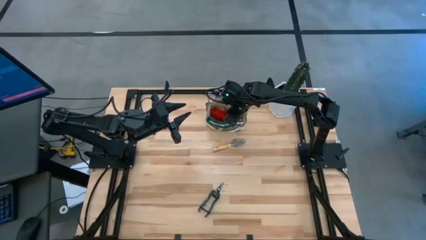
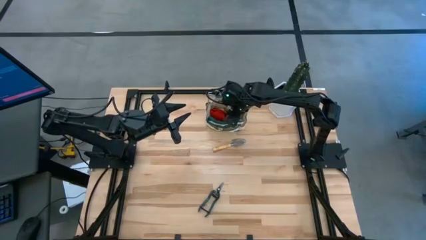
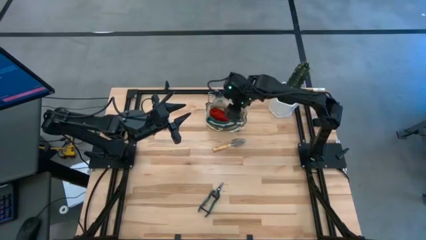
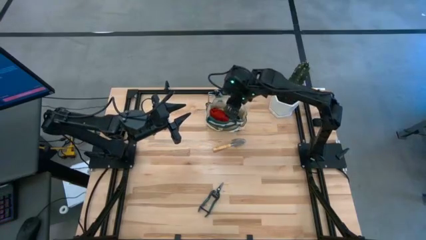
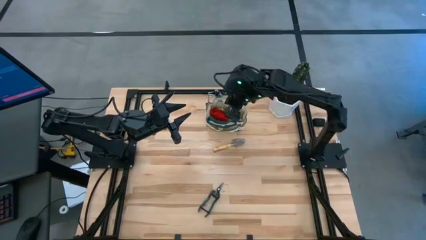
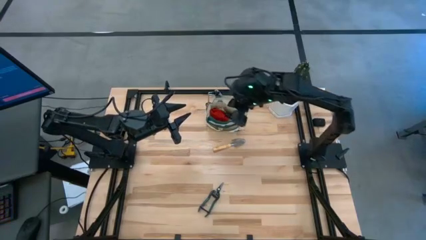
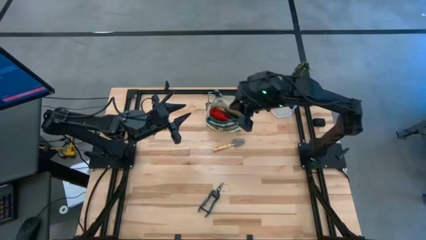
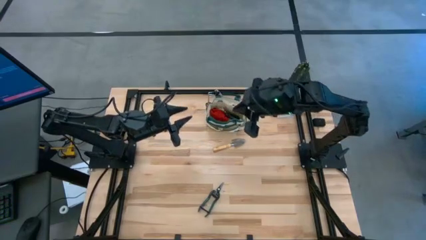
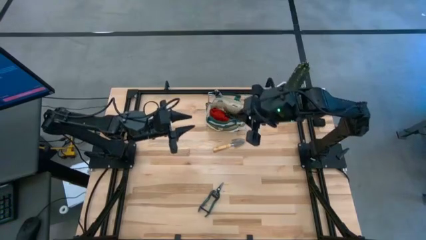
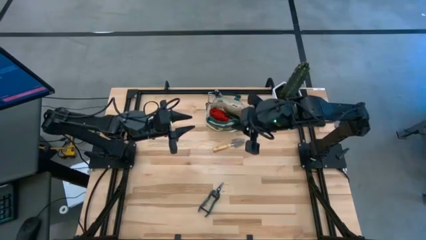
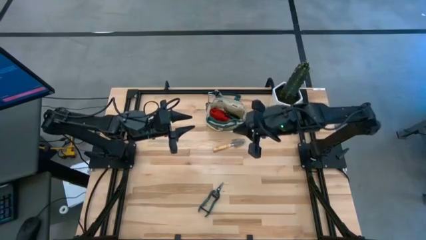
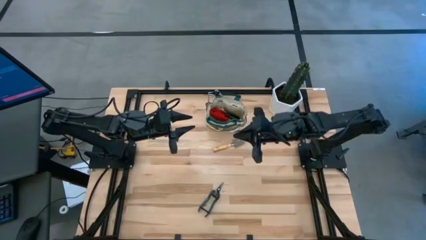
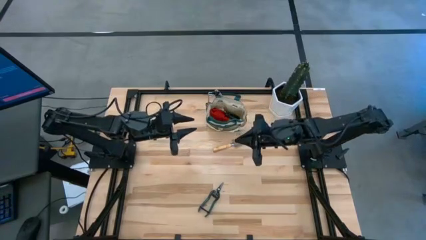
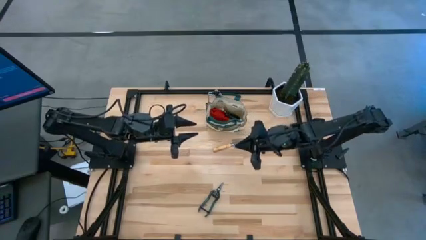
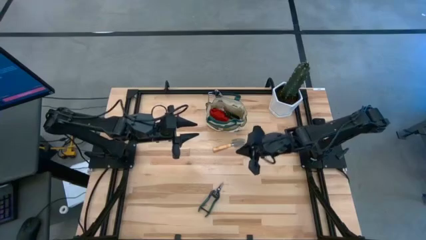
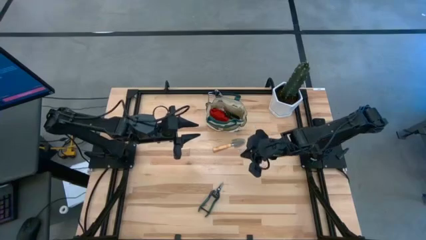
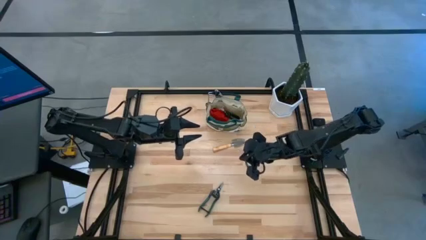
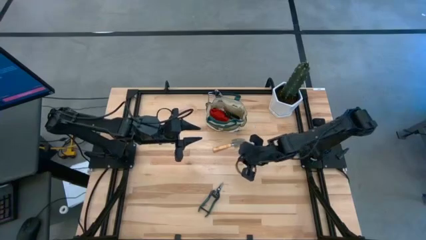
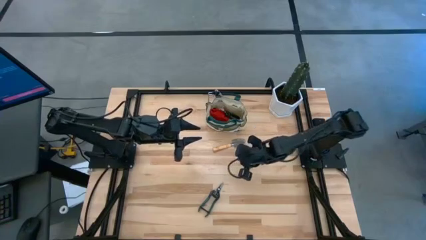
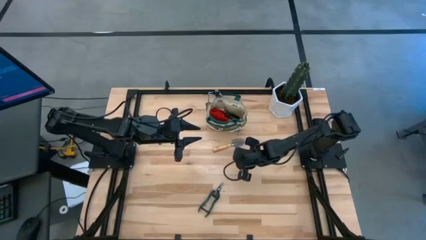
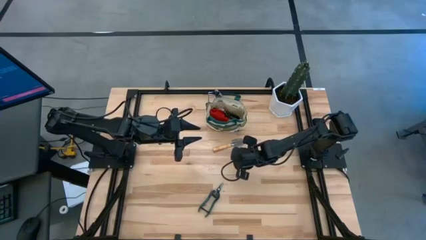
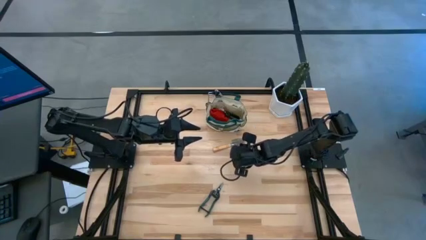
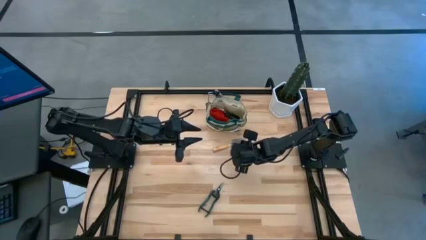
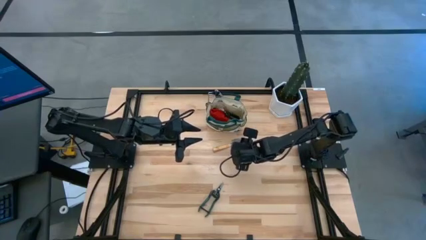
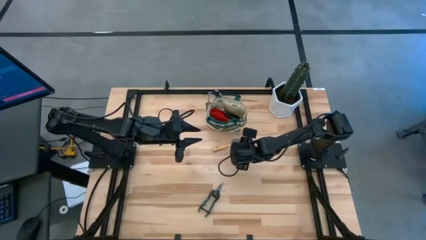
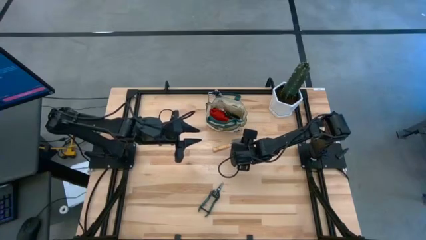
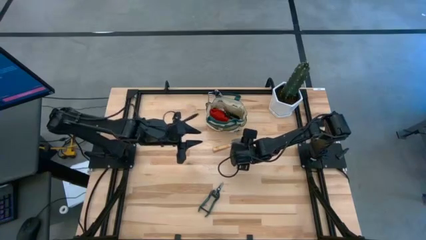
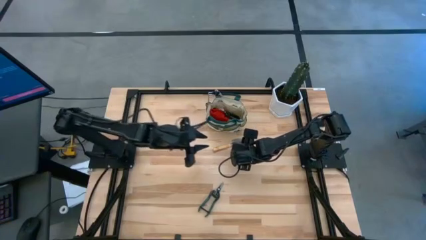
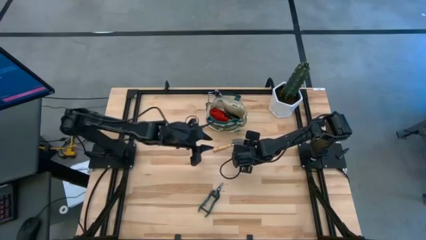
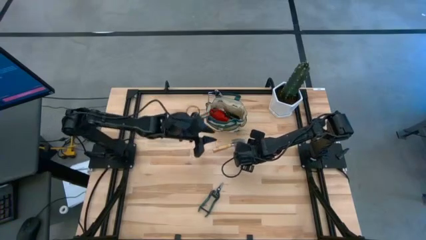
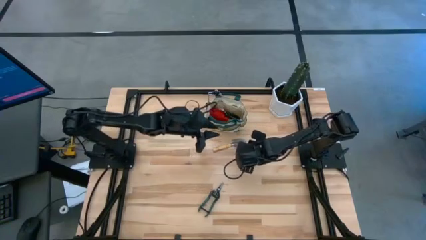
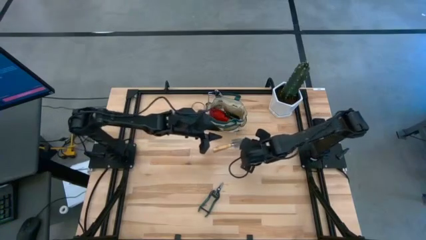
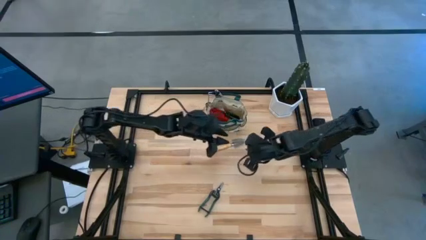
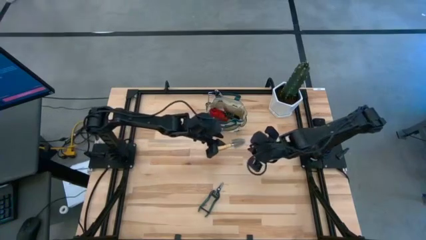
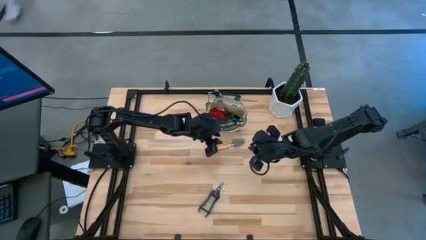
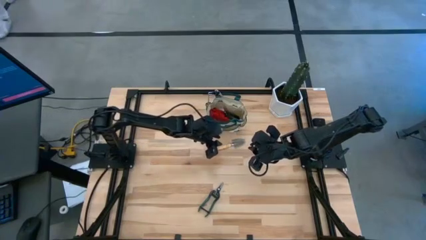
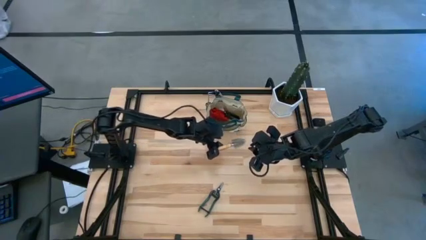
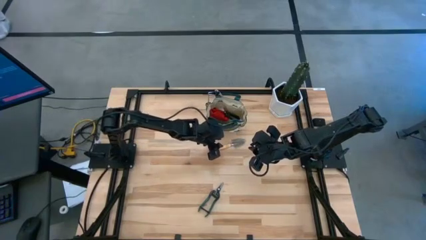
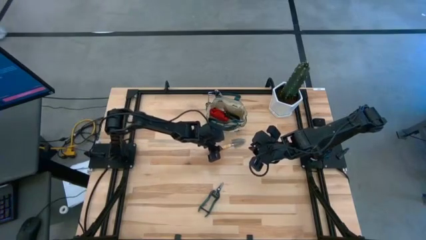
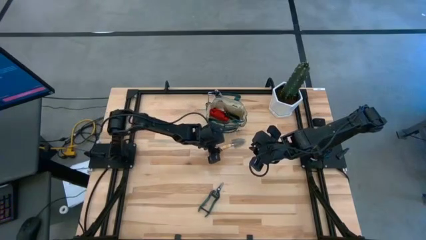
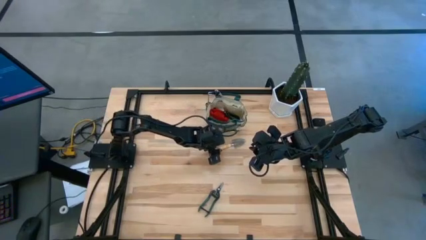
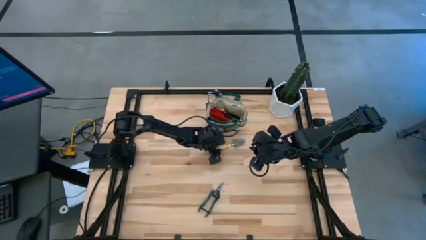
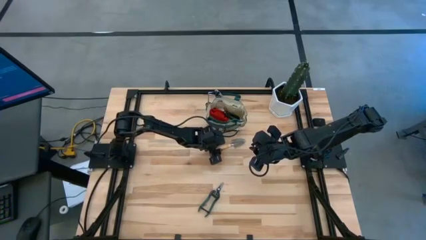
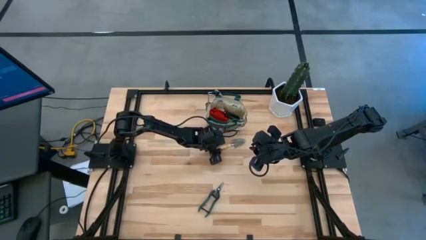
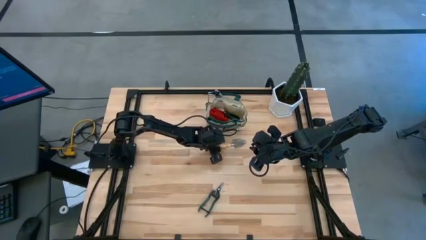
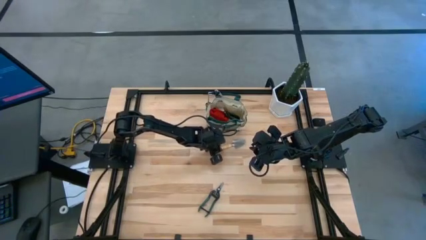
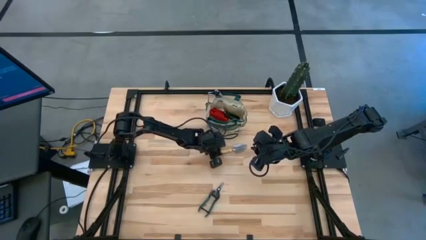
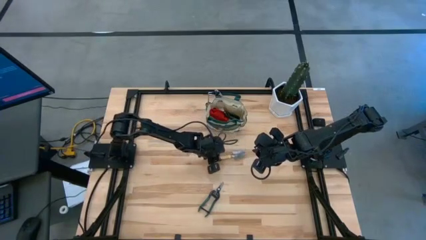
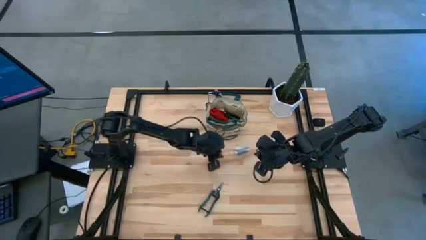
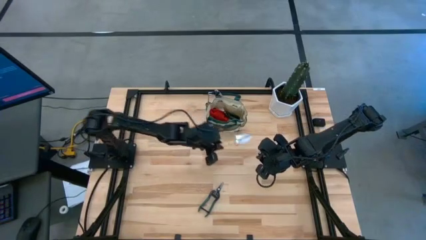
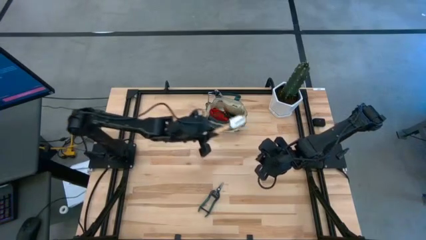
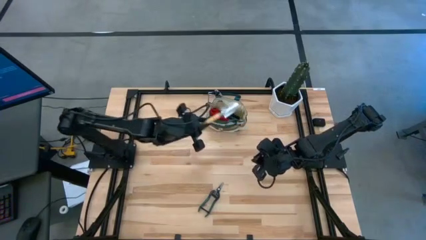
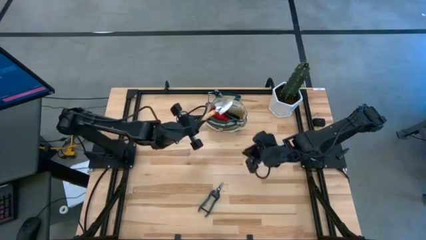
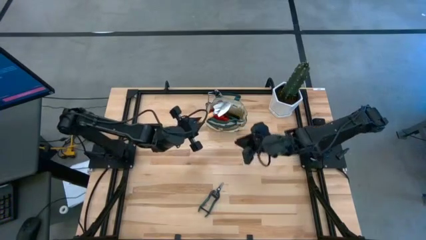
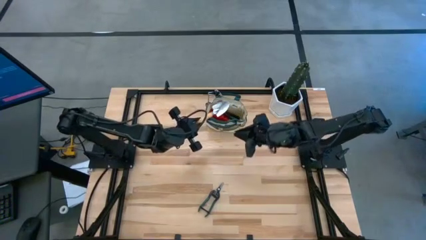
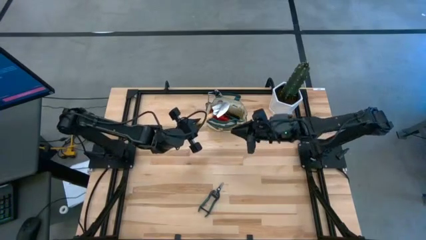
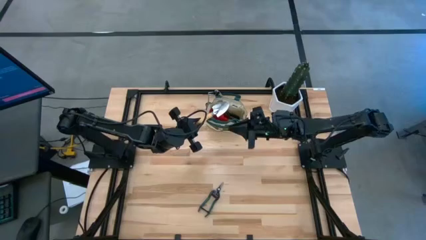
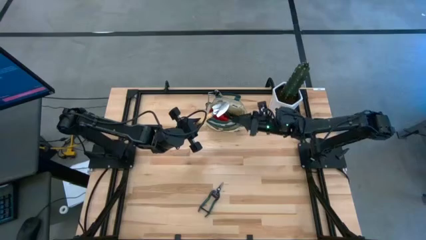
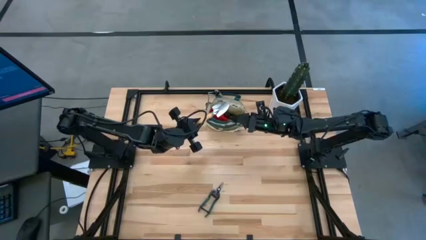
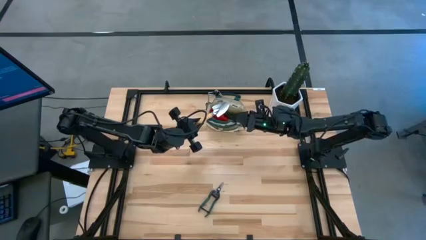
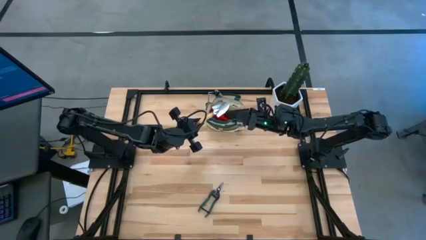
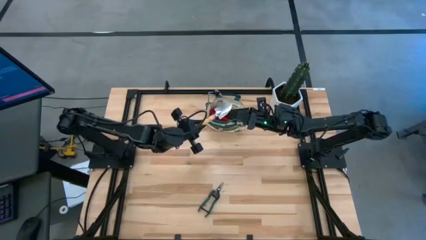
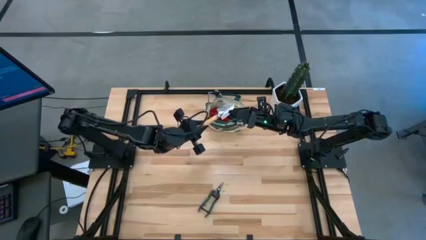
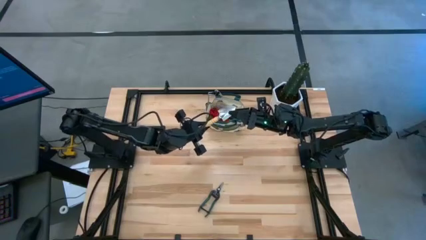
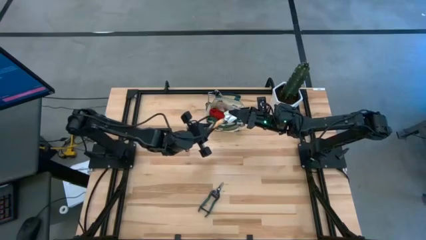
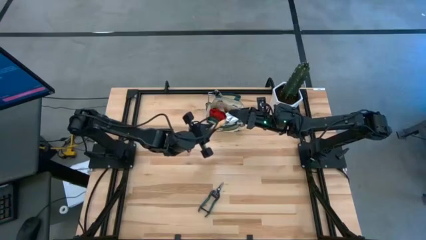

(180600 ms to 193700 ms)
Task: Pick & Place Garden tools in Gardening bag
Put the brown trowel into the brown gardening bag
